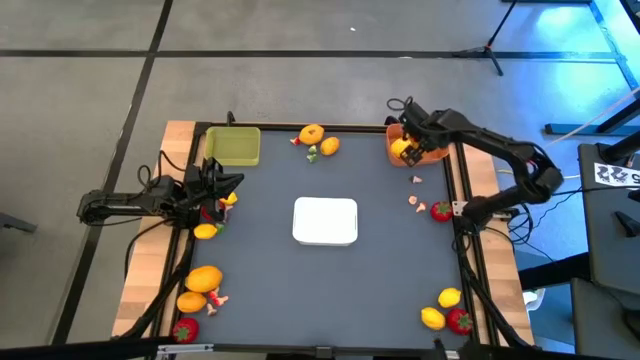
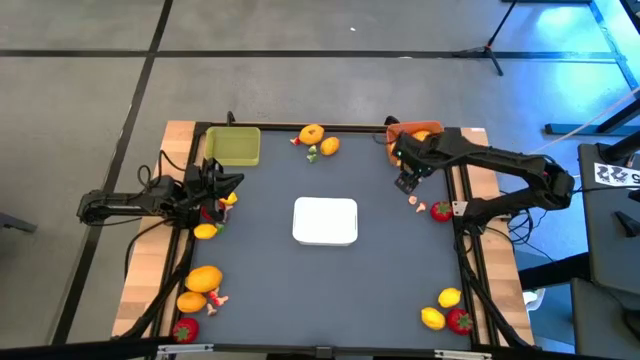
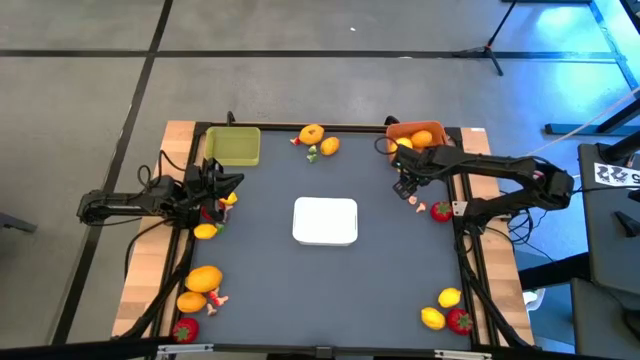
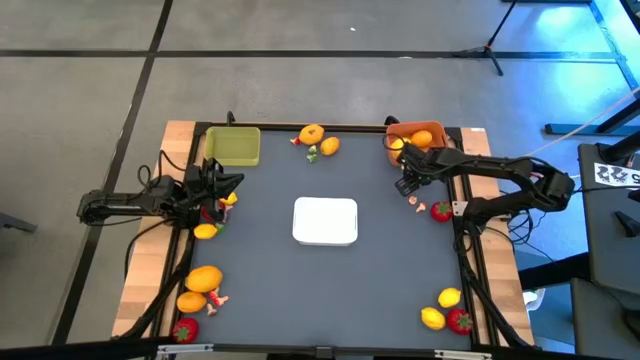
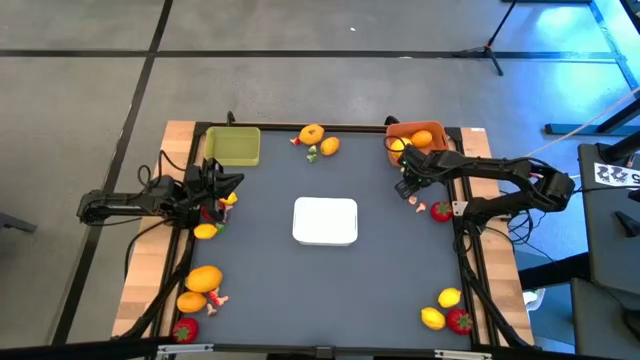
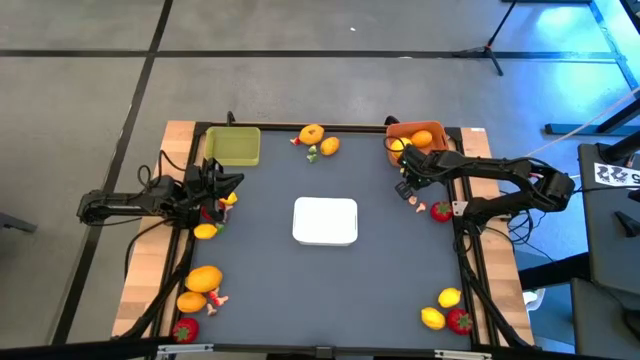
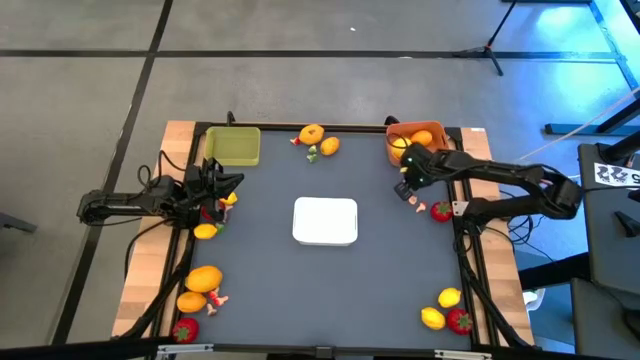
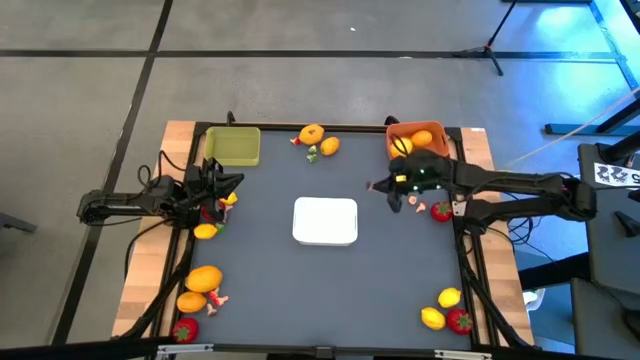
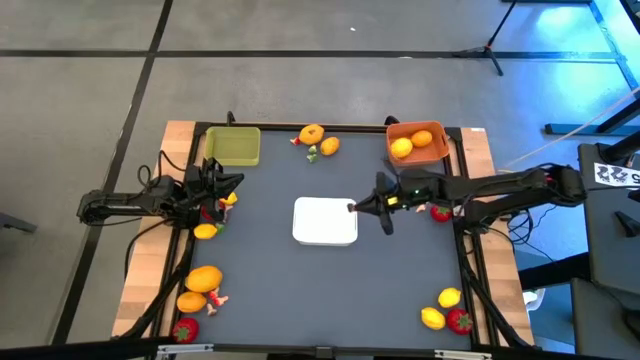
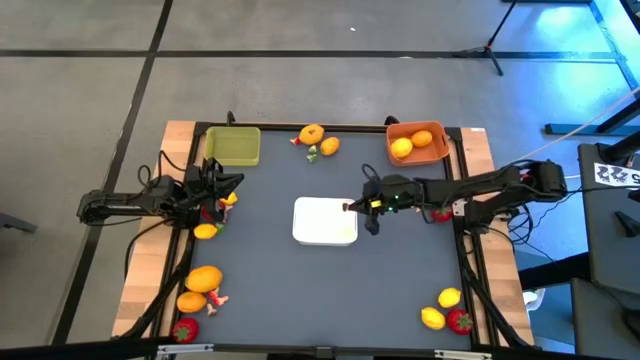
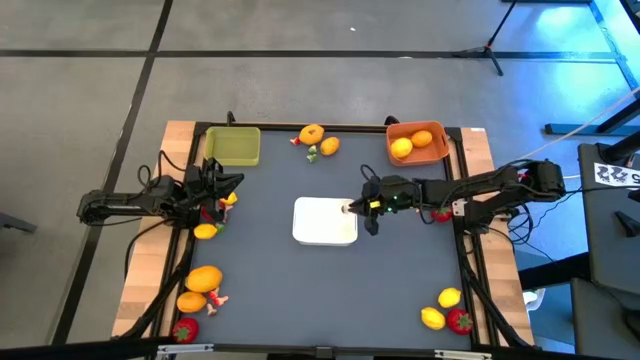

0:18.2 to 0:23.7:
Task: Sort produce into baskets
Put the brown mushroom into the white bin

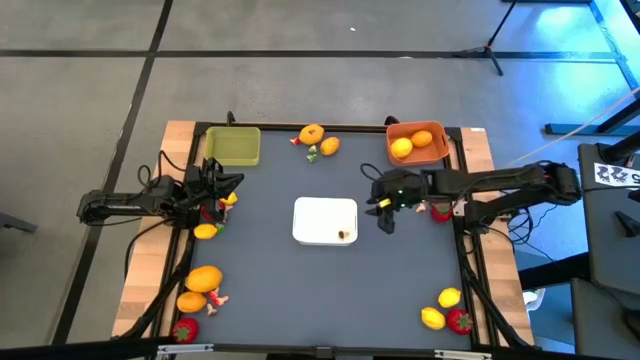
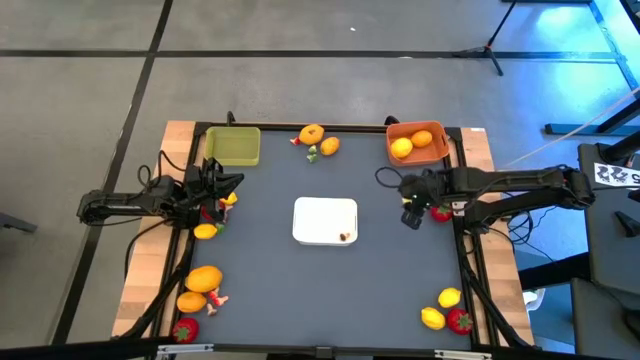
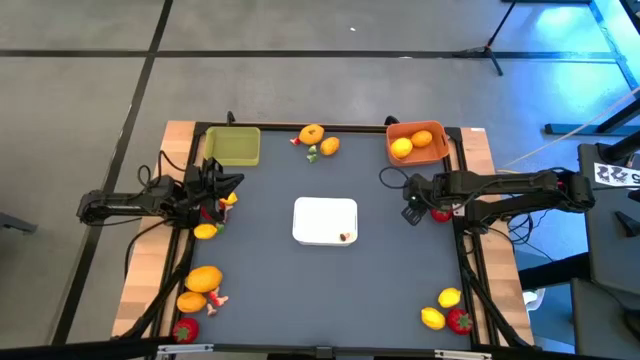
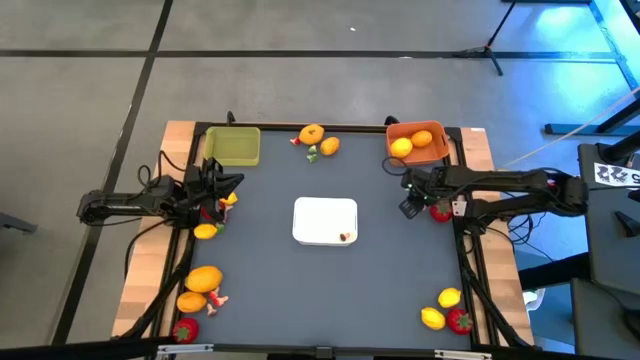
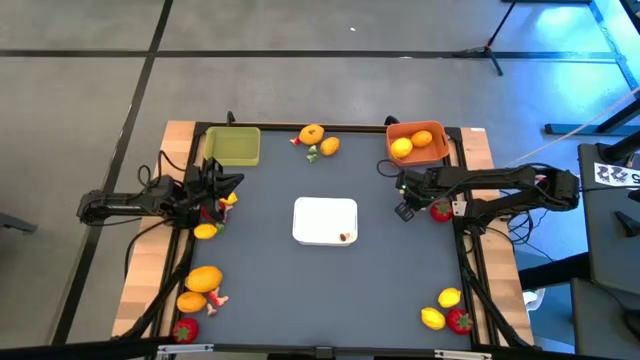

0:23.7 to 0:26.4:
Put the red mushroom into the white bin

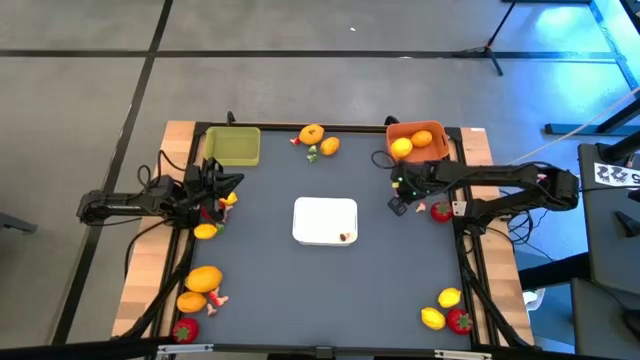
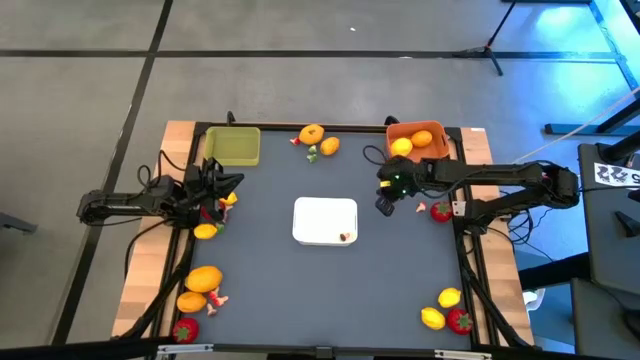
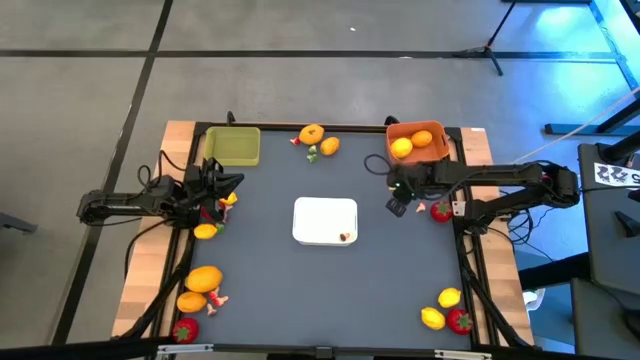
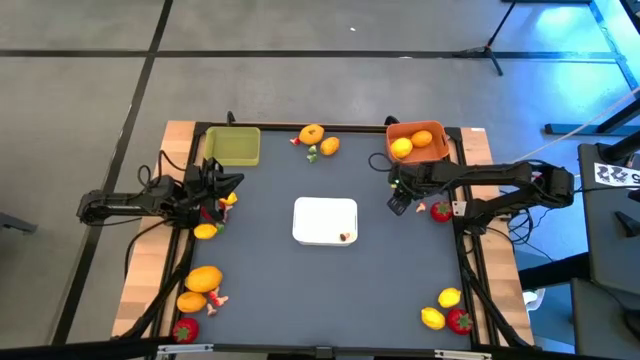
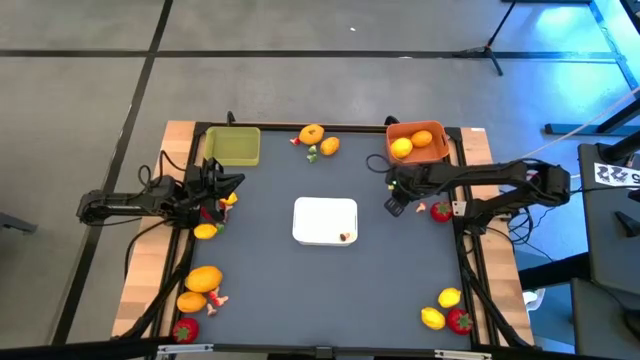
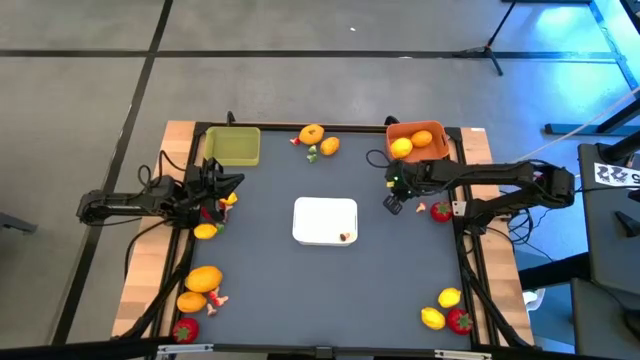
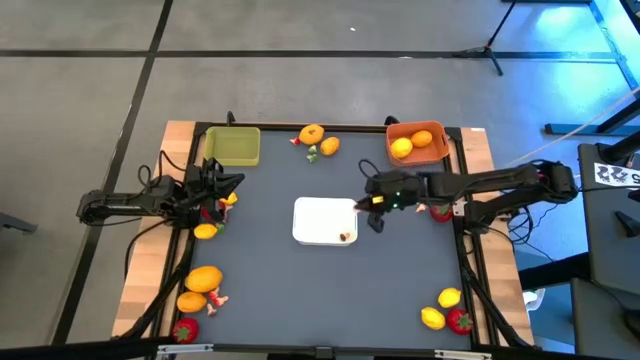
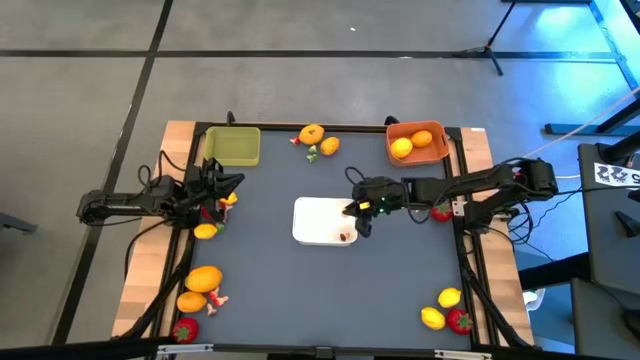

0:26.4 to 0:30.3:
Put the red mushroom into the white bin

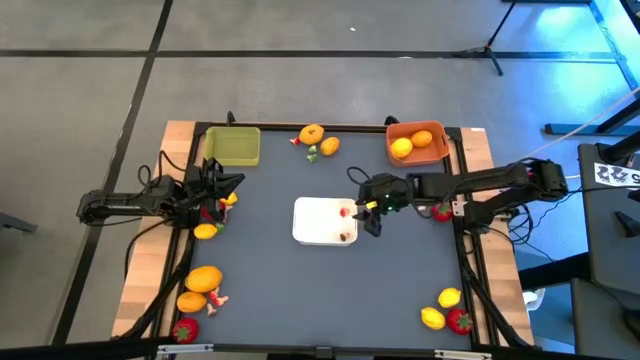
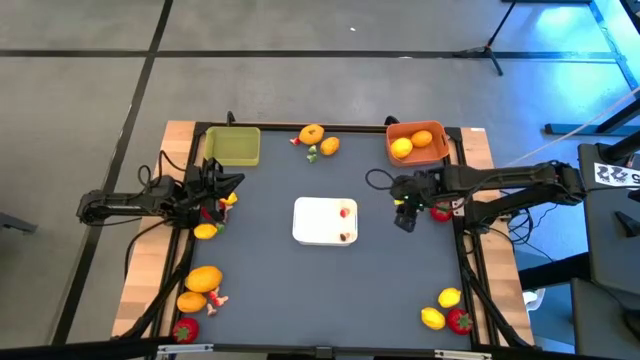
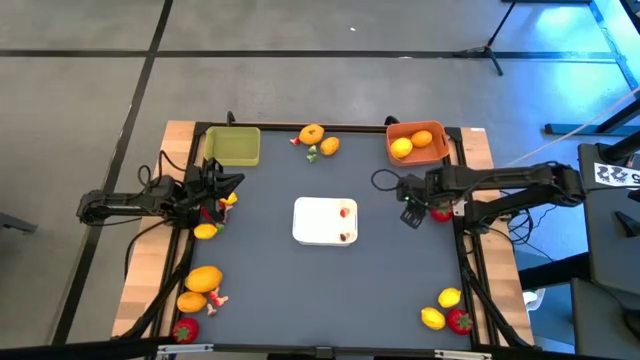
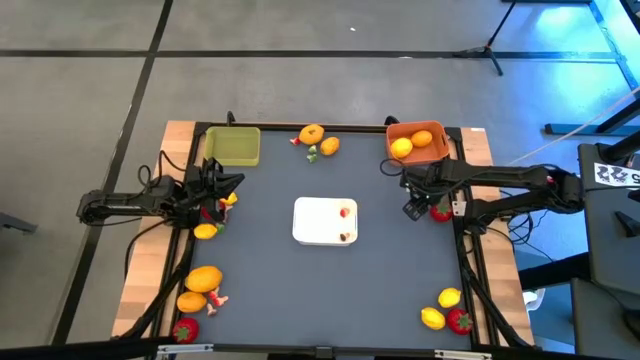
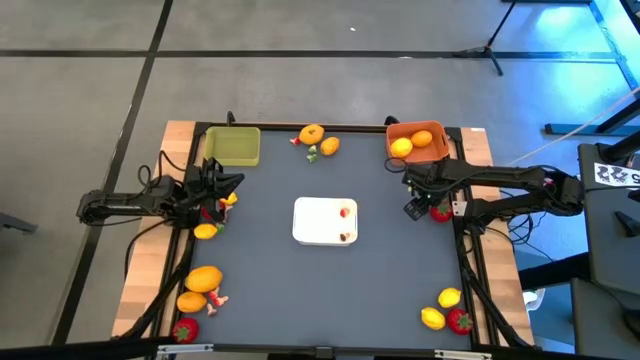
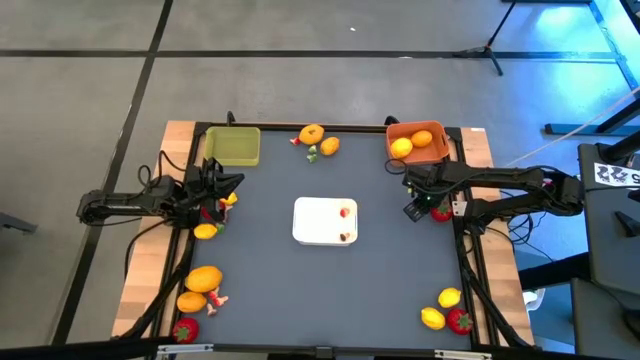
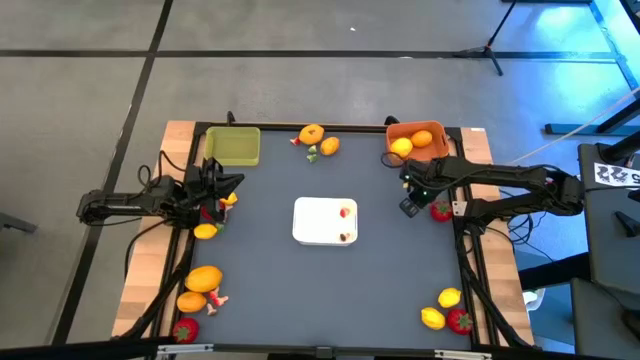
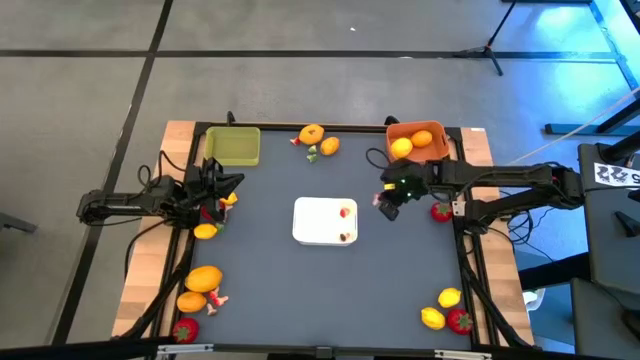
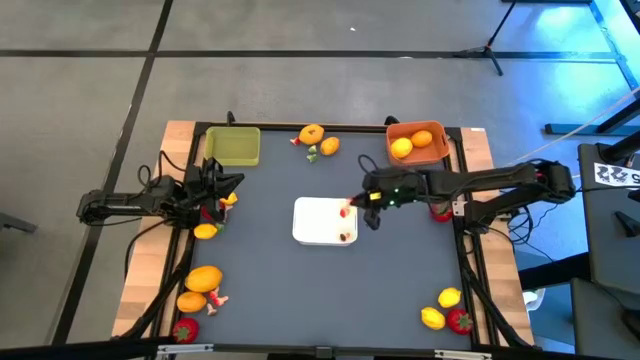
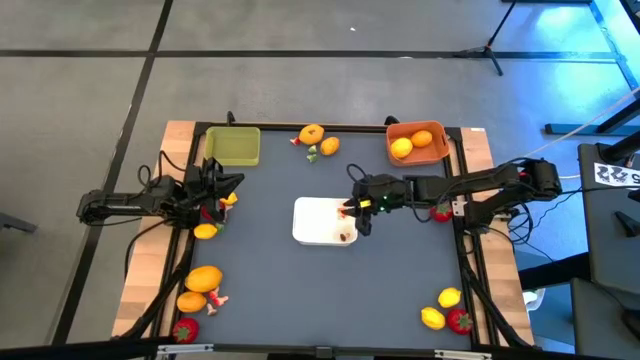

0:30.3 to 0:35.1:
Put the red mushroom into the white bin

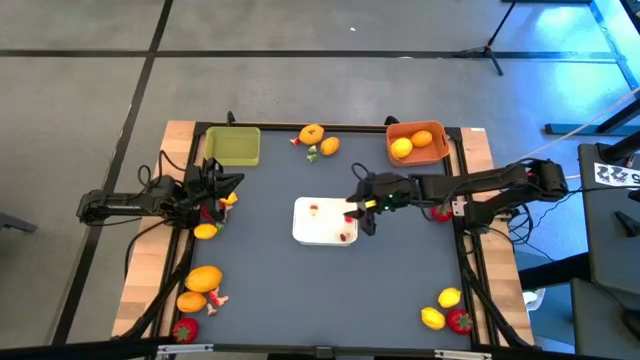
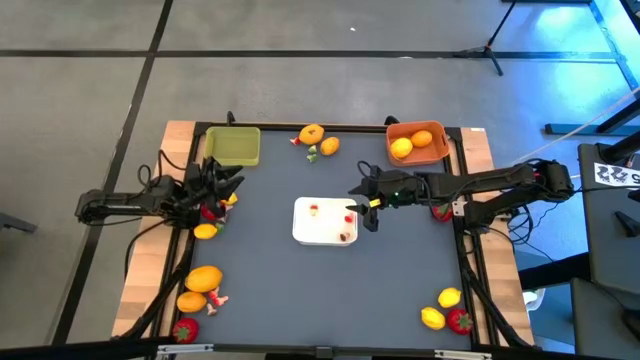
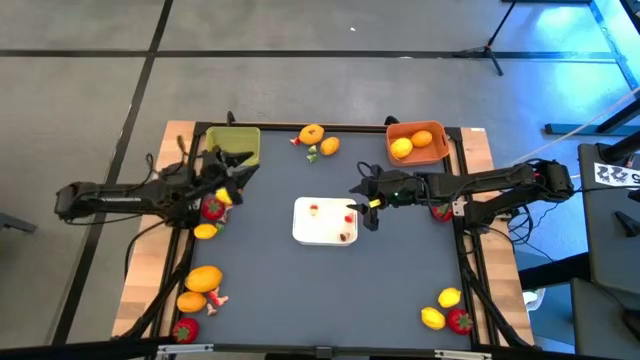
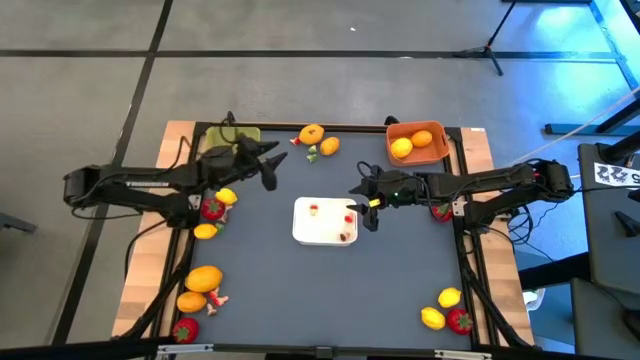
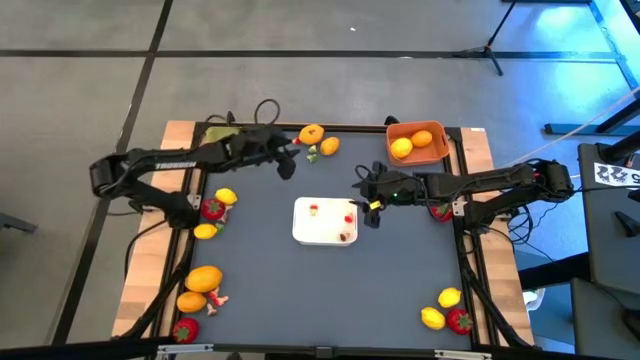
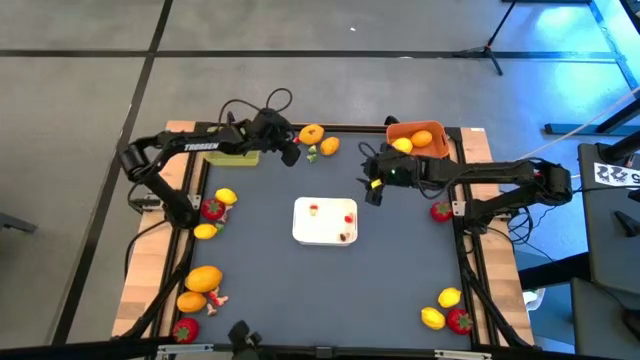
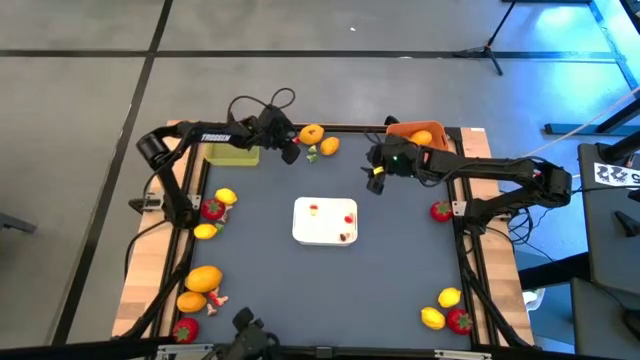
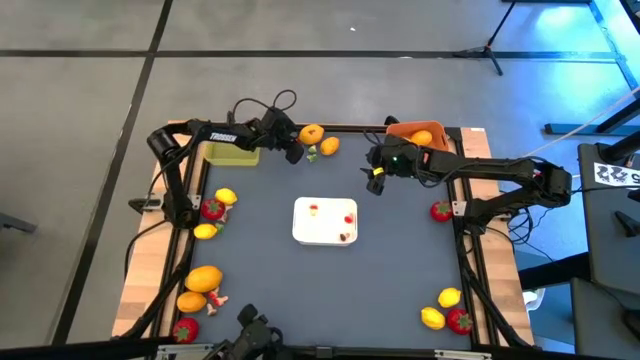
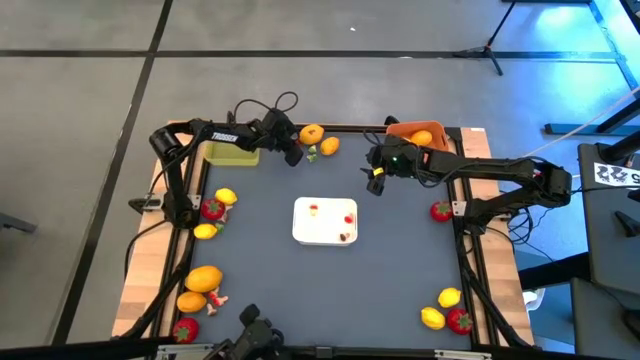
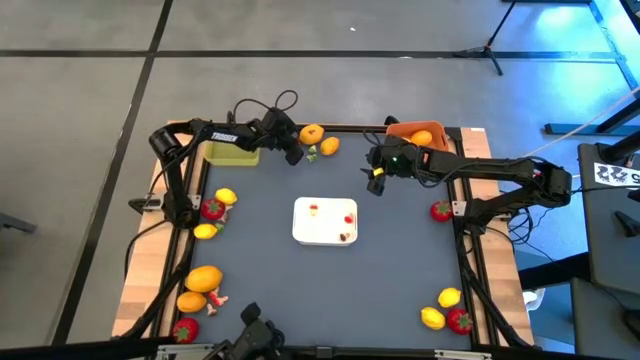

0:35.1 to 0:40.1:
Put the red mushroom into the white bin
